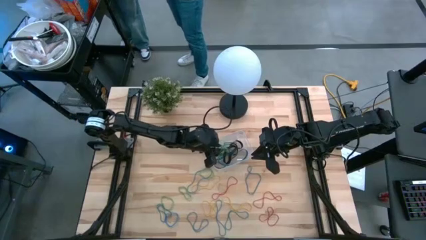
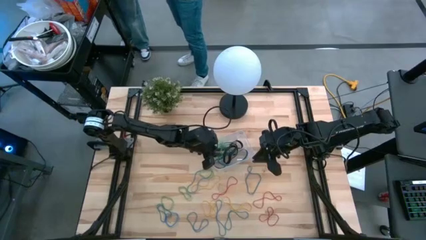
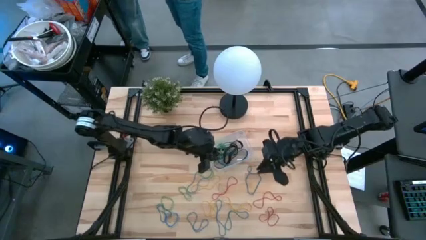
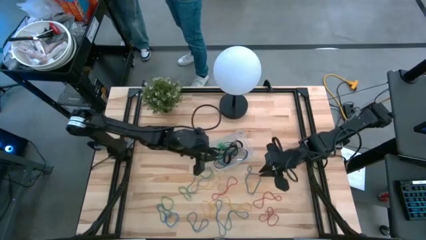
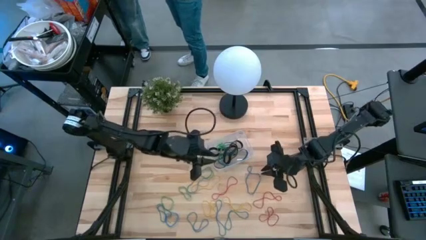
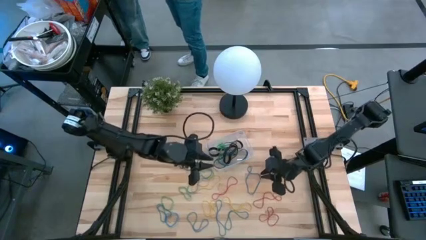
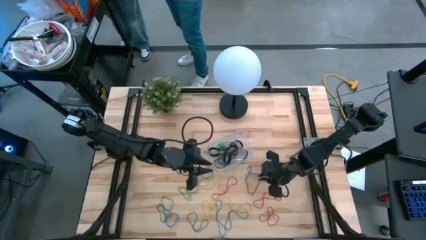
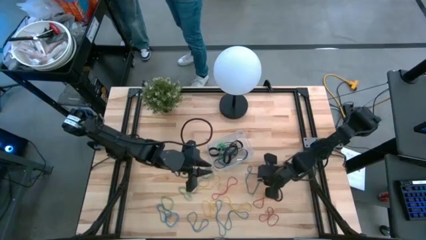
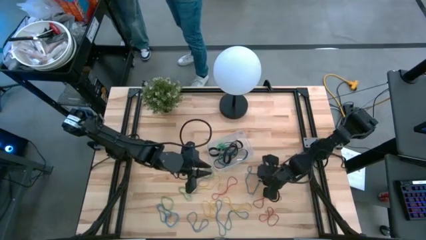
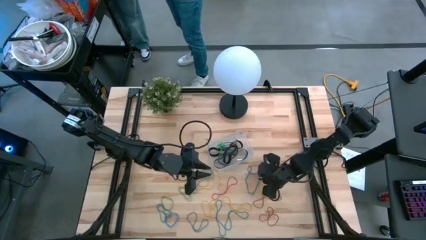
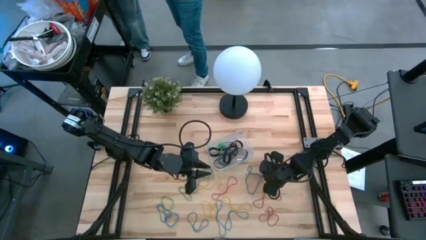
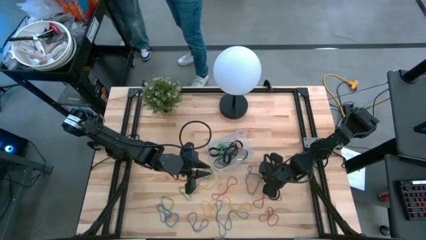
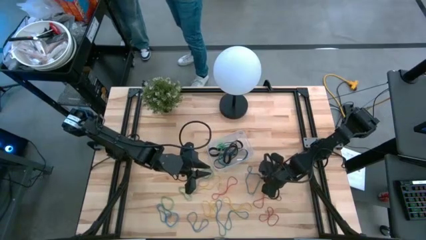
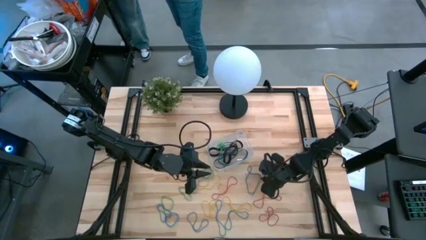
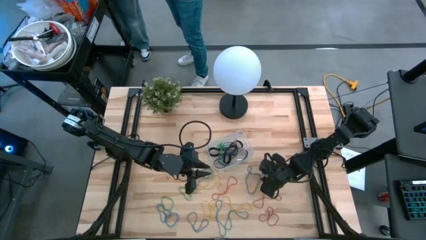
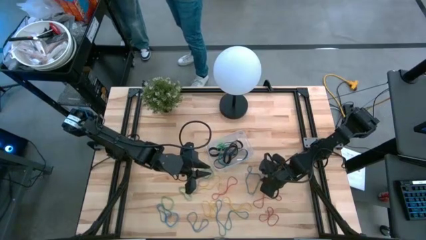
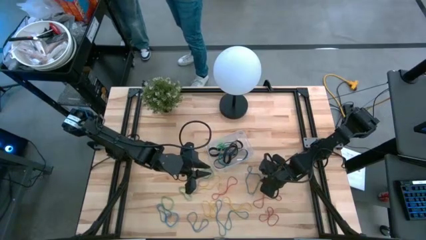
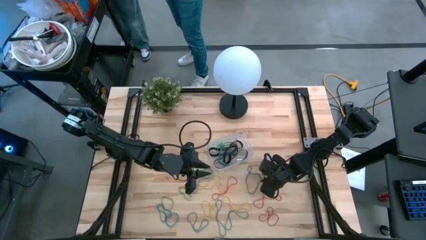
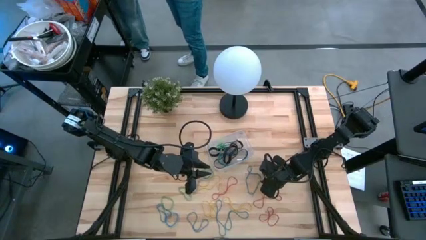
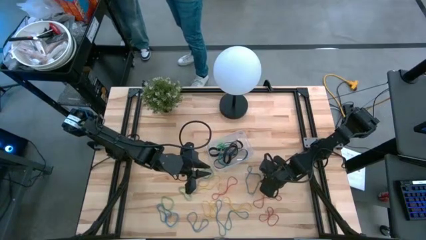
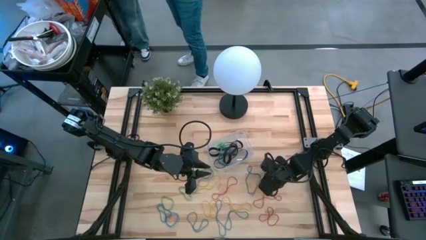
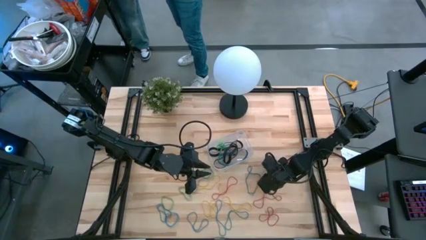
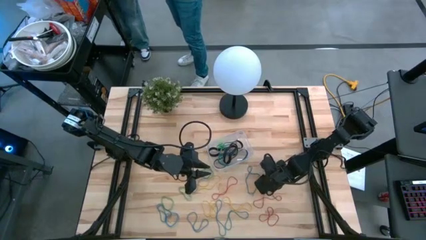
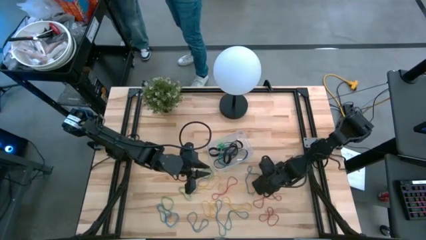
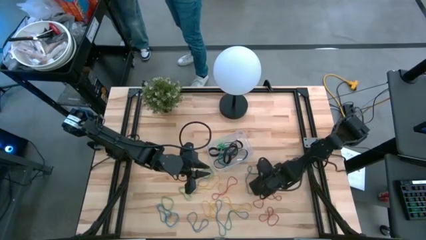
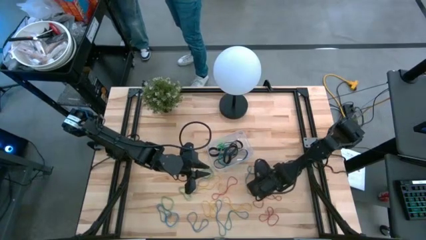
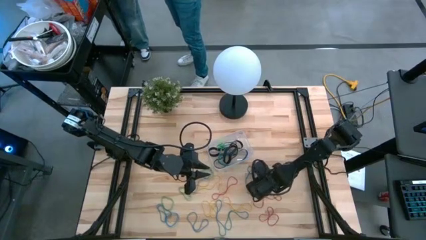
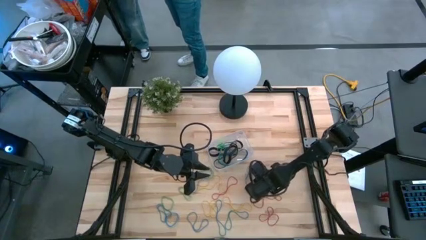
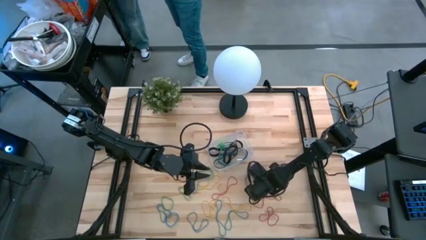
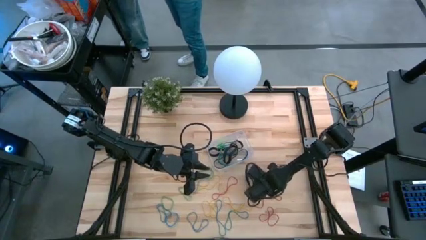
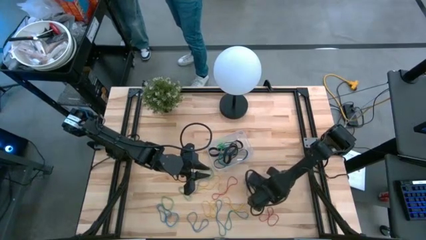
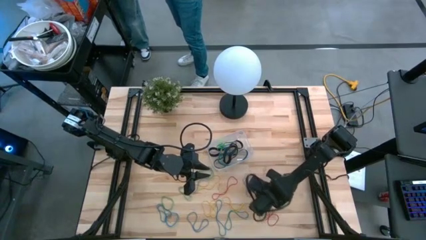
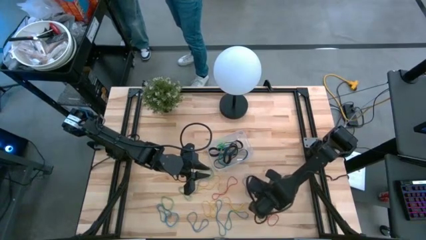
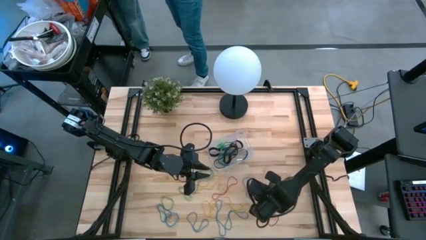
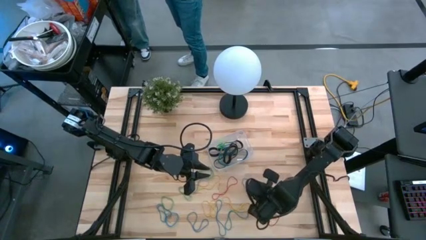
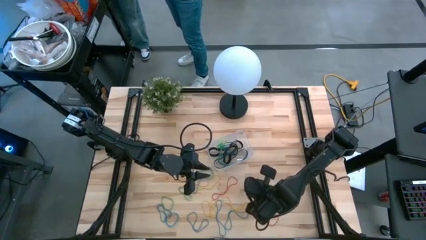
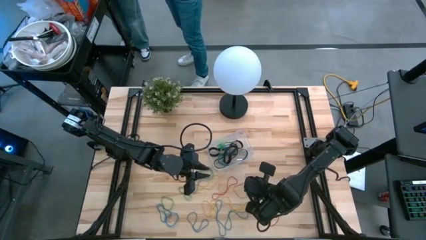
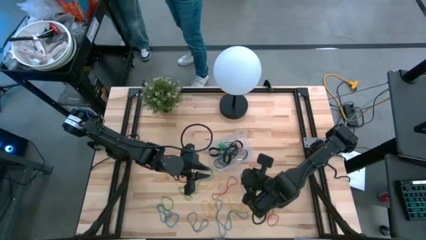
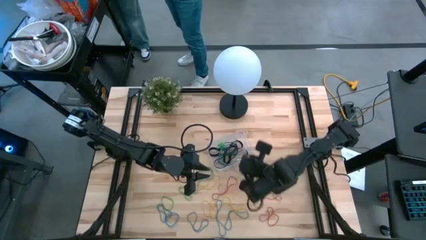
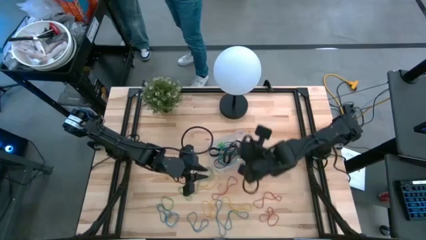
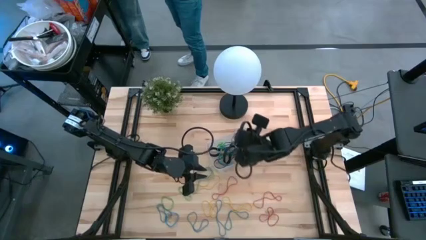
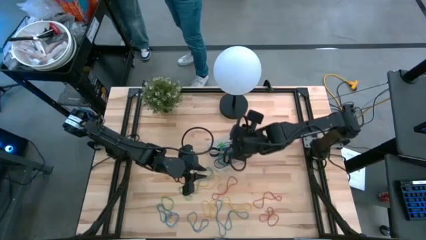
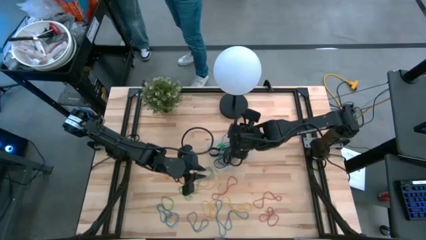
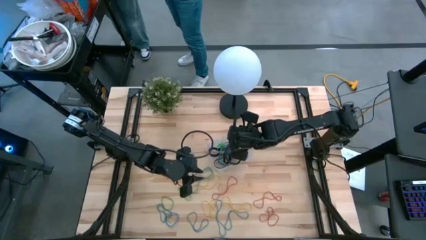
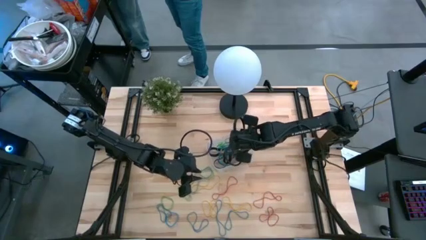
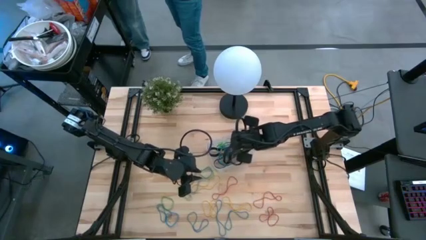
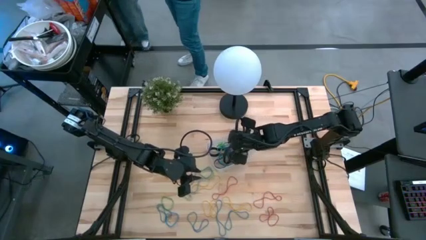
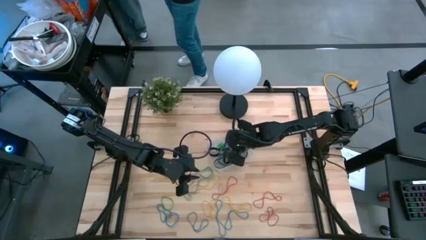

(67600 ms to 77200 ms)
Task: Pick and place rubber bands into bin
Put the blue rubber band into the transparent bin

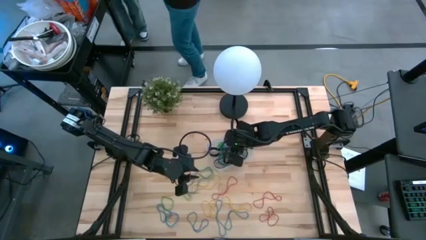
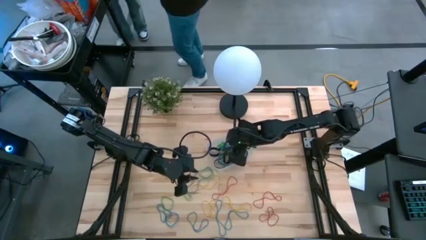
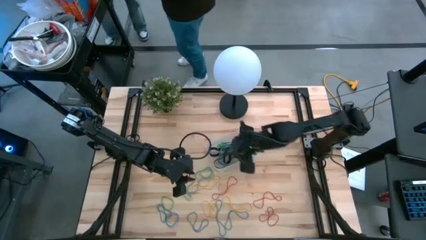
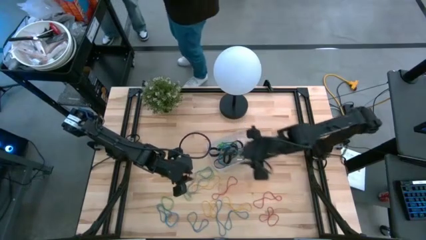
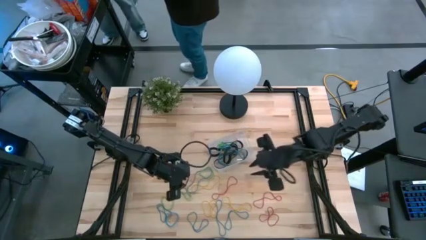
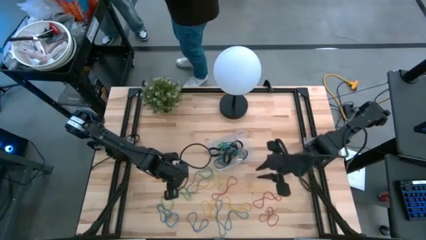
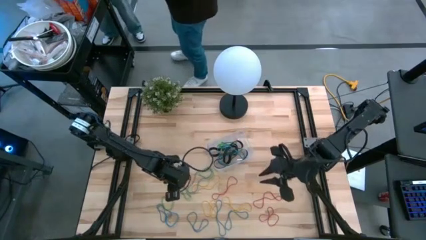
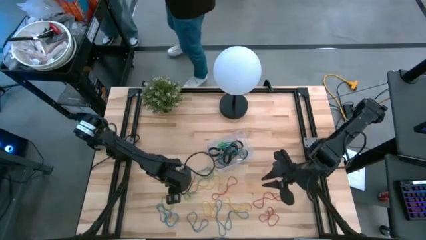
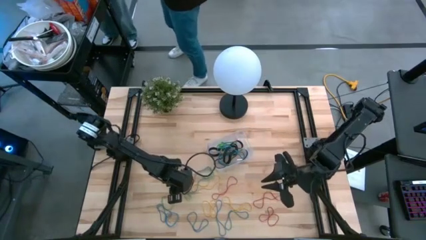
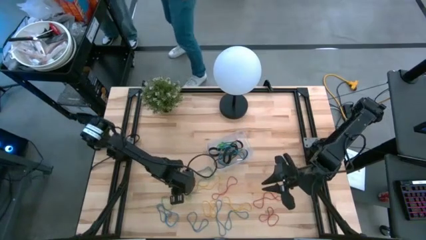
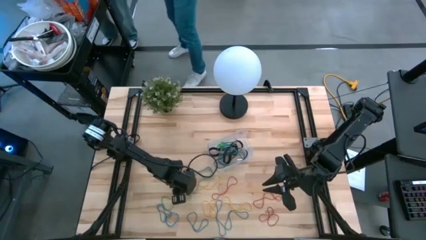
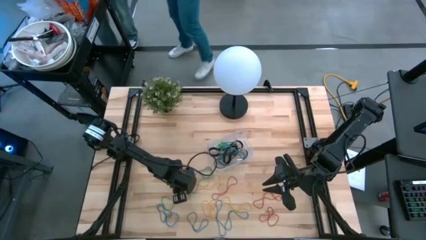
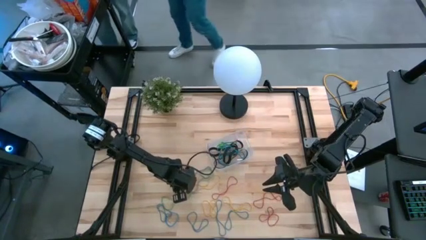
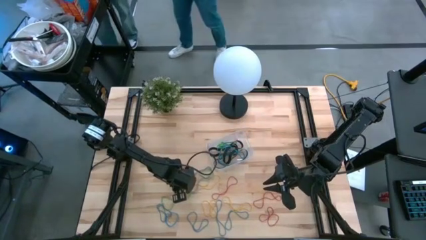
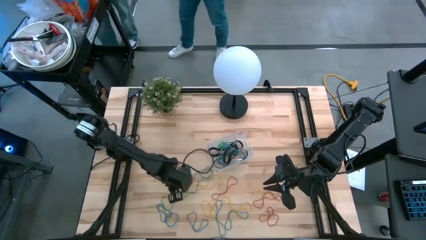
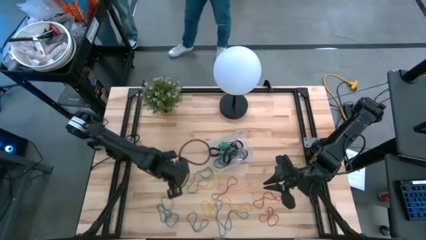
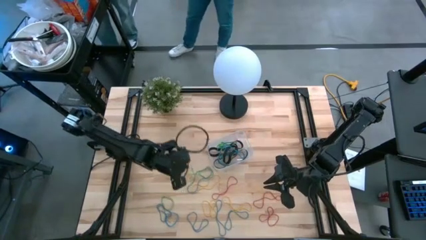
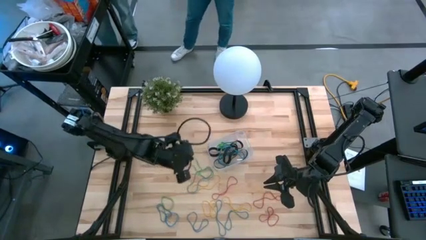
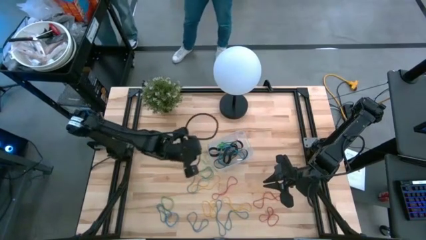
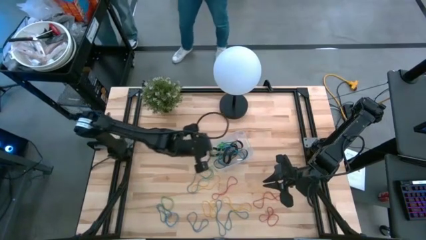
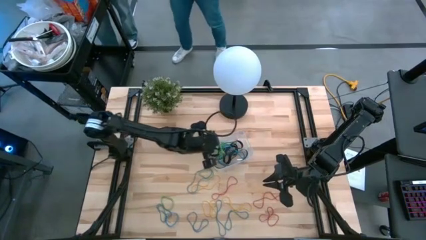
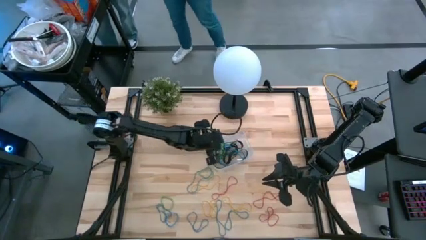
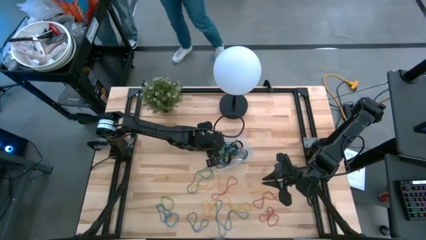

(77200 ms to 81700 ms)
Put the green rubber band into the transparent bin
